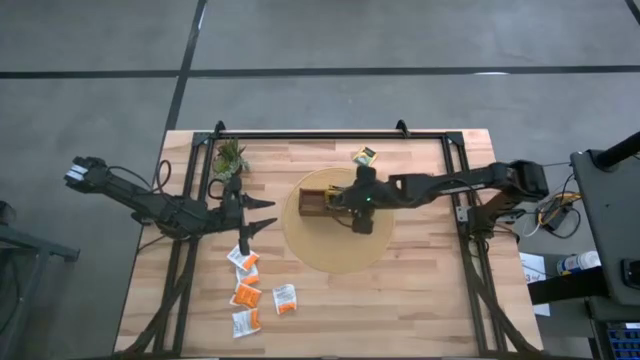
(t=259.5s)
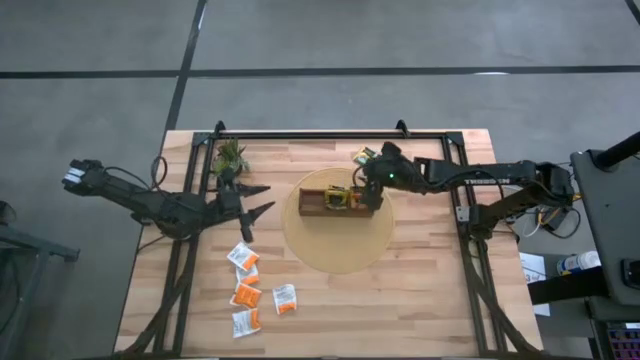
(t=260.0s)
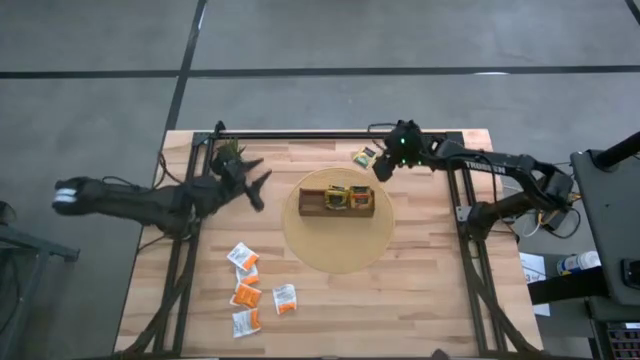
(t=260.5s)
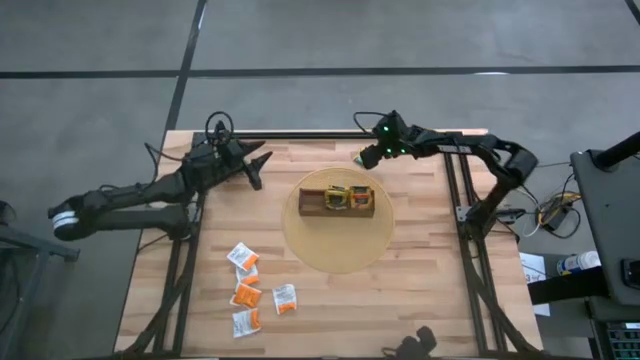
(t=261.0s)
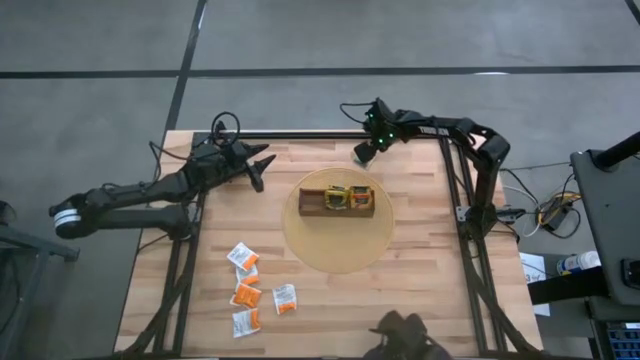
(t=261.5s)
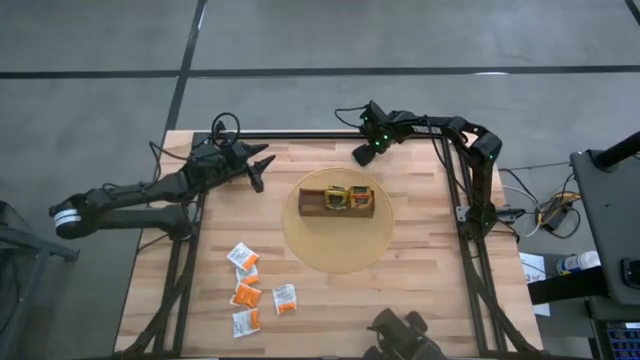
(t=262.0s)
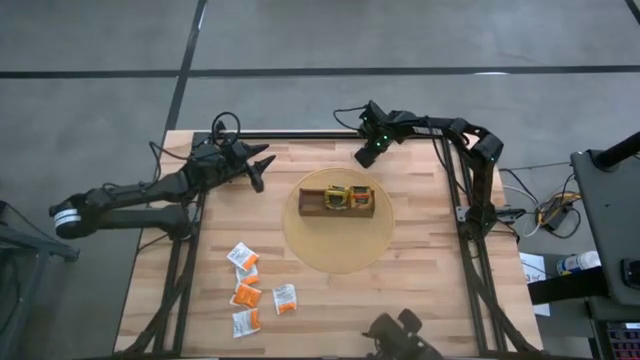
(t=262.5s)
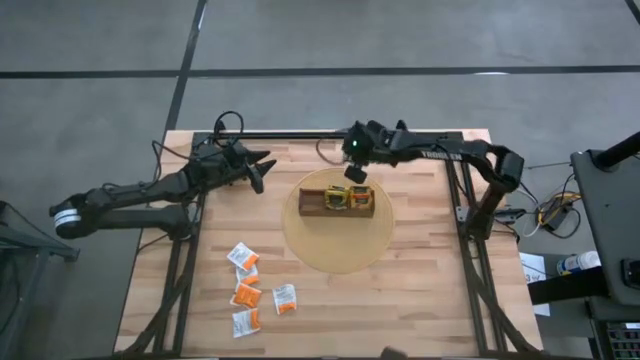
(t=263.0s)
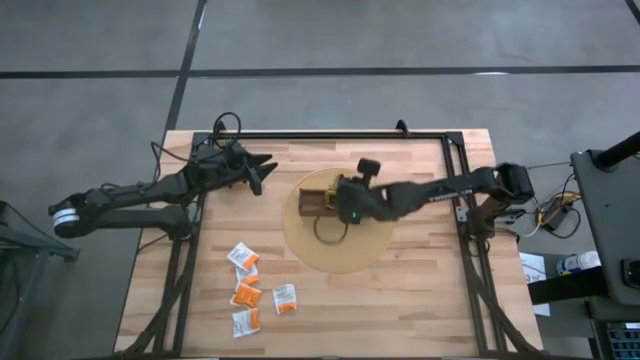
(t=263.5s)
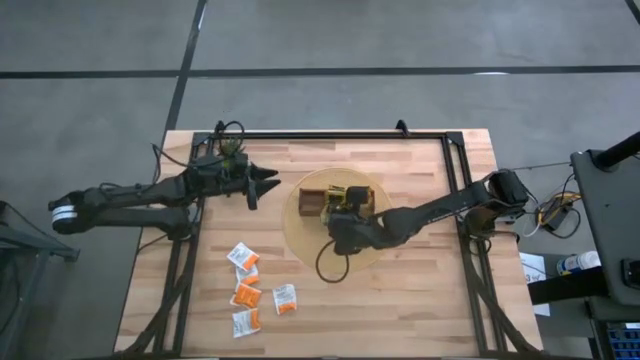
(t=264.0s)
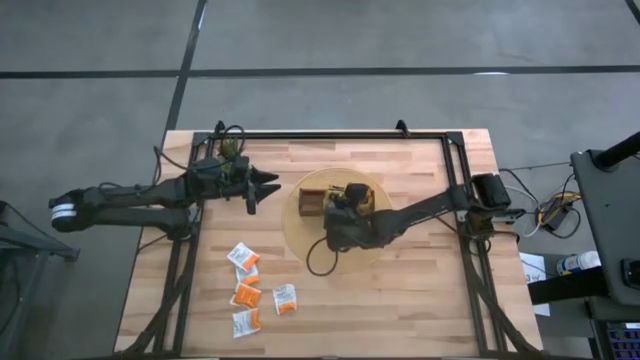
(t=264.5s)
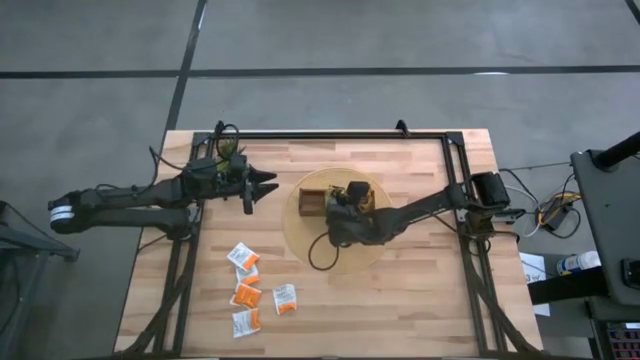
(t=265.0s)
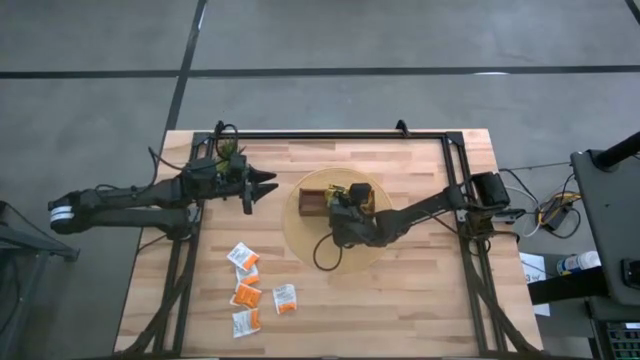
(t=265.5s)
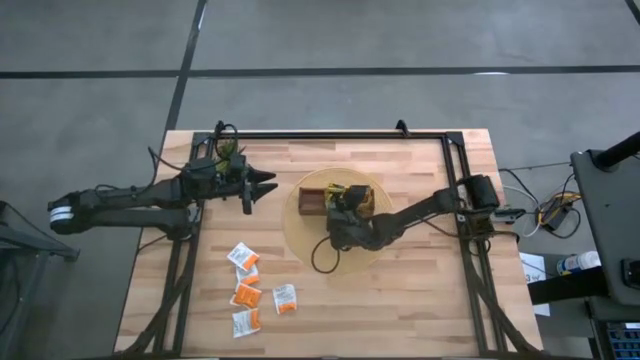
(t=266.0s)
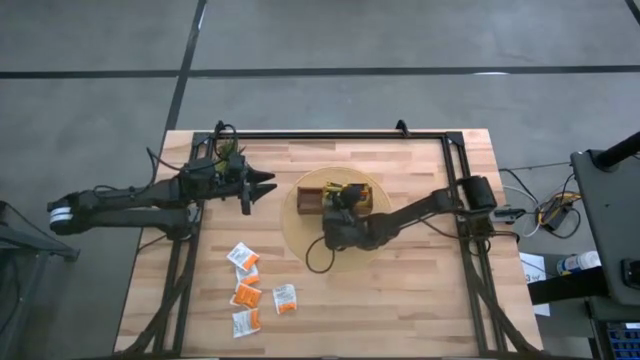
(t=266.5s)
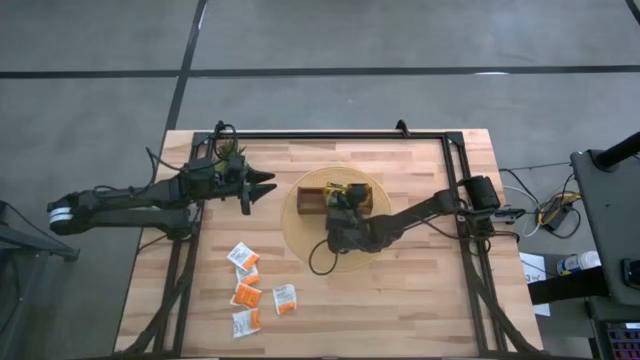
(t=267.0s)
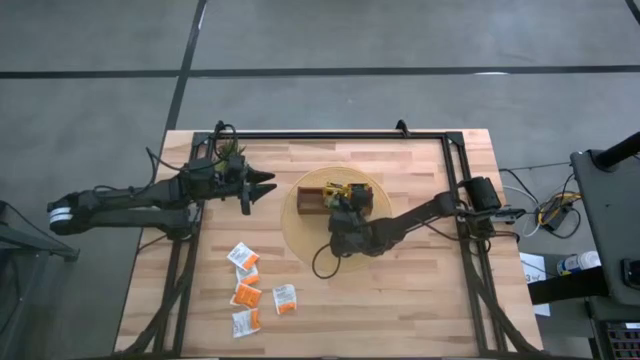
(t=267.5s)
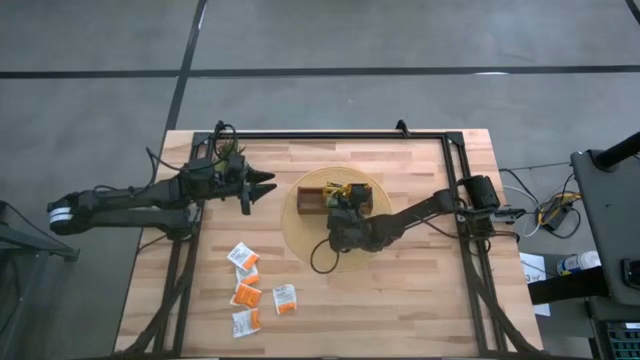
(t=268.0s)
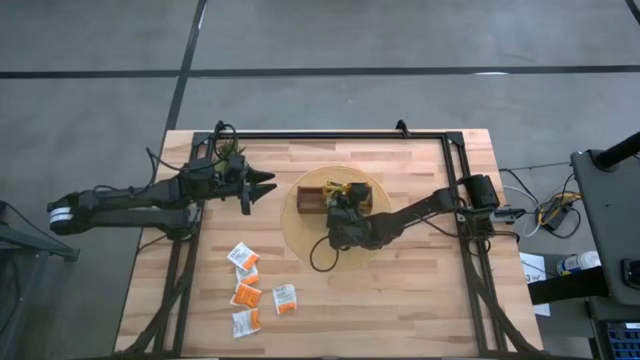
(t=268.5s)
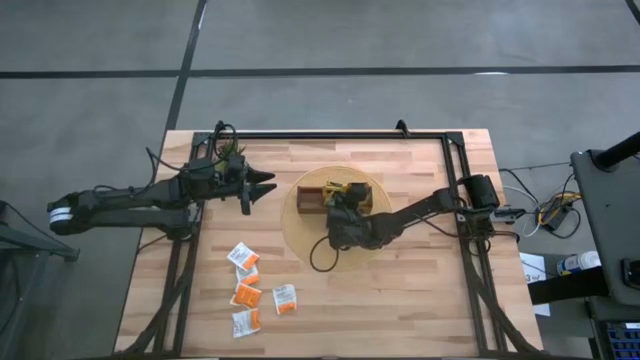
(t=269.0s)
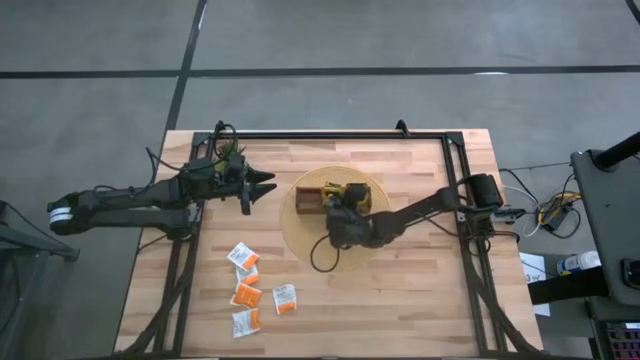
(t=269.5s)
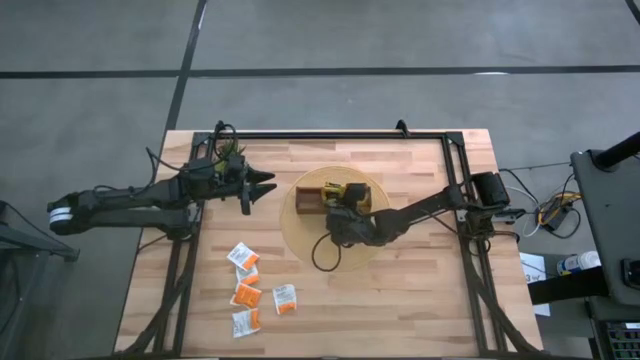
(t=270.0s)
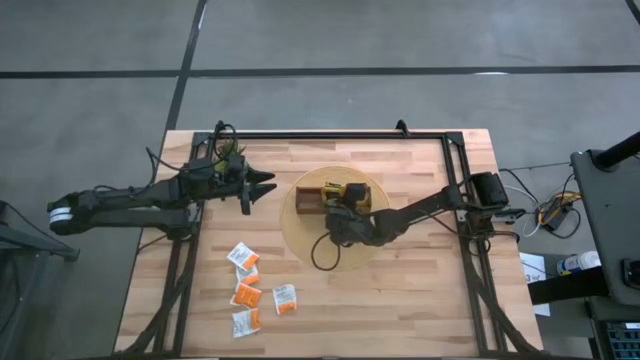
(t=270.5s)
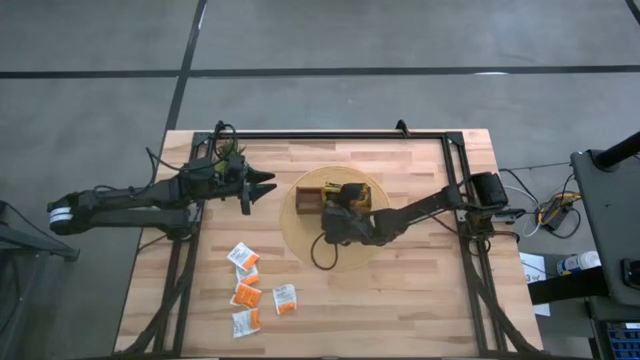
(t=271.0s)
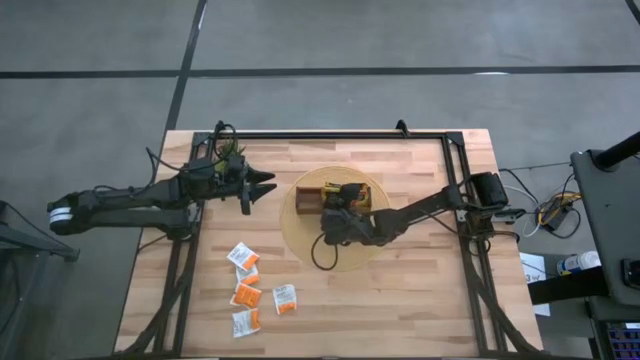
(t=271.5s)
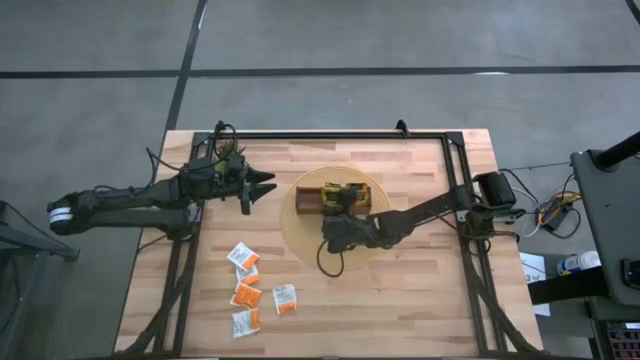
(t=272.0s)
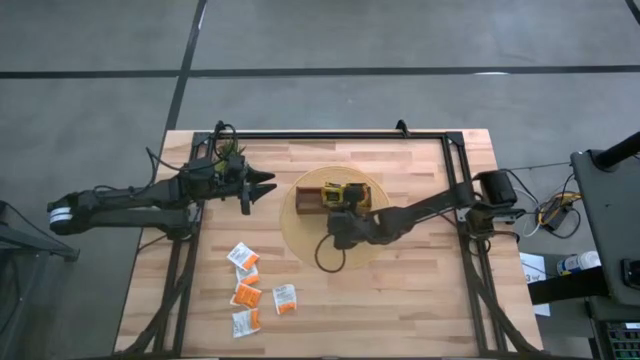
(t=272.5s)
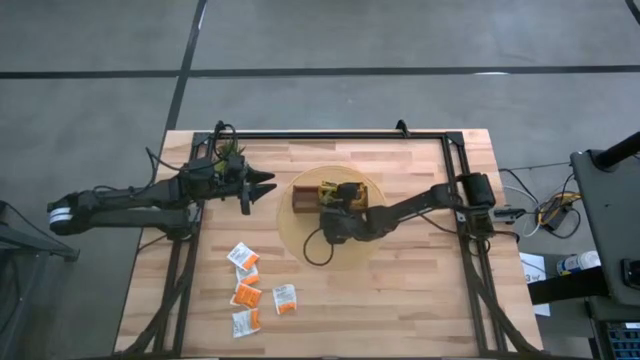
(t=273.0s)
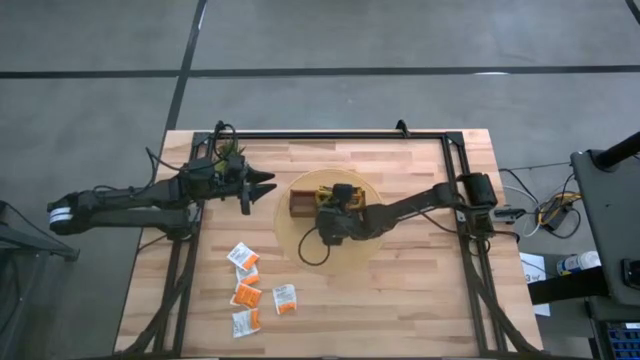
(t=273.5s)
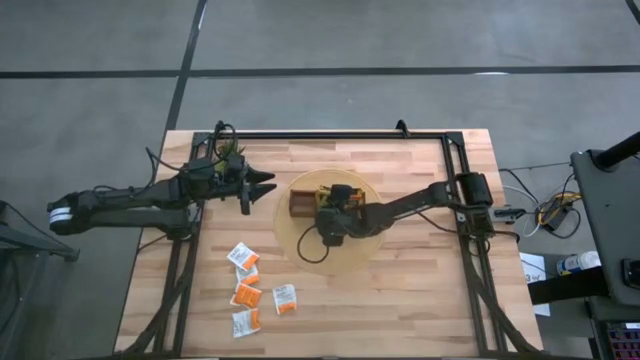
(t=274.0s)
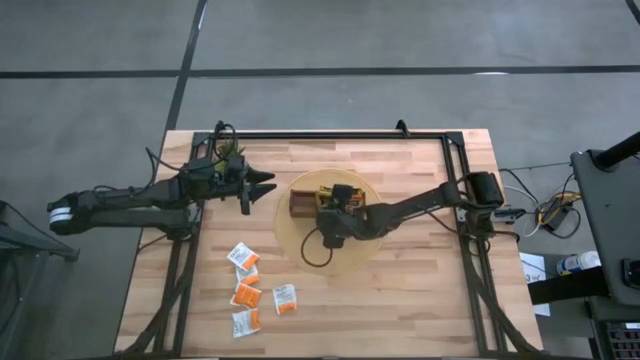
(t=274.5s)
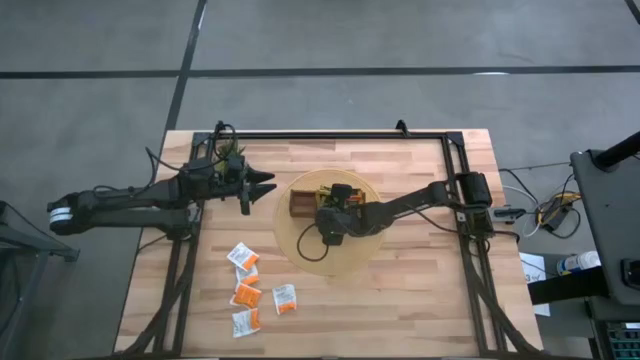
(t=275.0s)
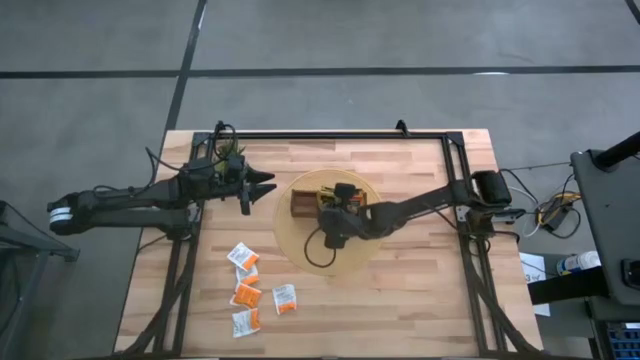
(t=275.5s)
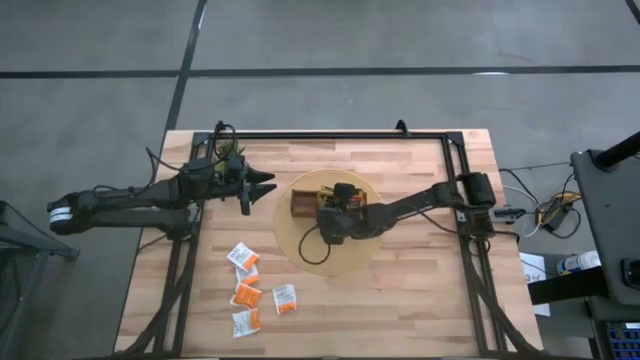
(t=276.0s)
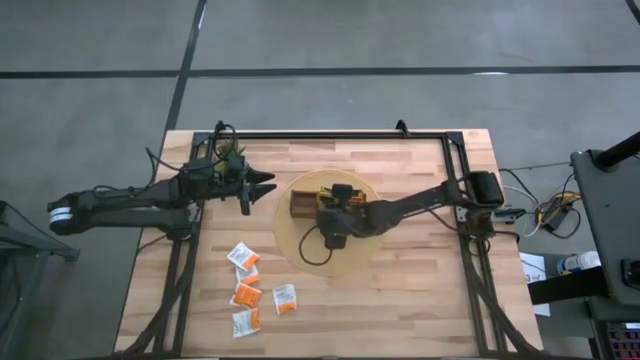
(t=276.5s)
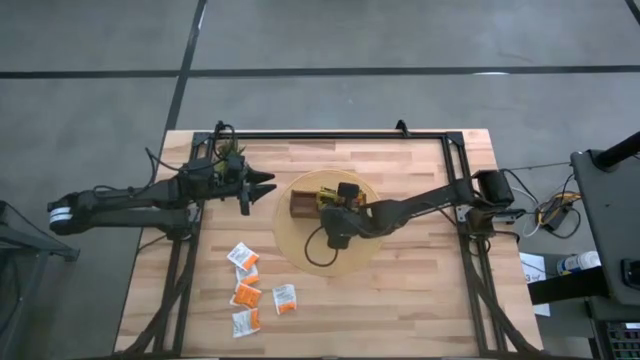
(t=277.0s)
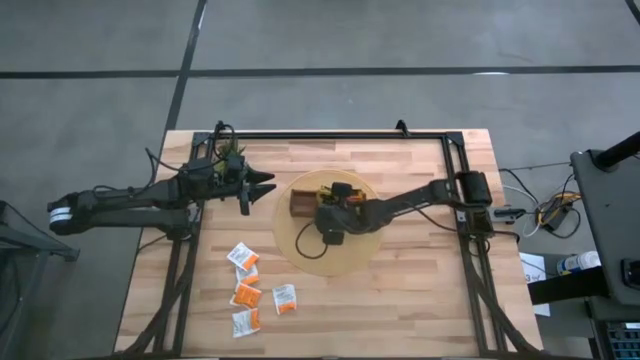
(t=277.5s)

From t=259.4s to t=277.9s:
Task: Pick & Place Tea
Put the yellow tea bag into the middle section of the wooden organizer

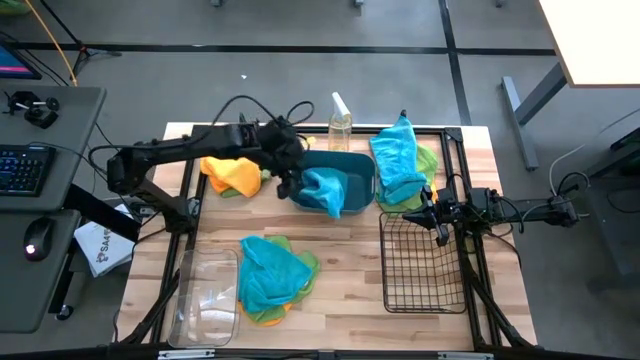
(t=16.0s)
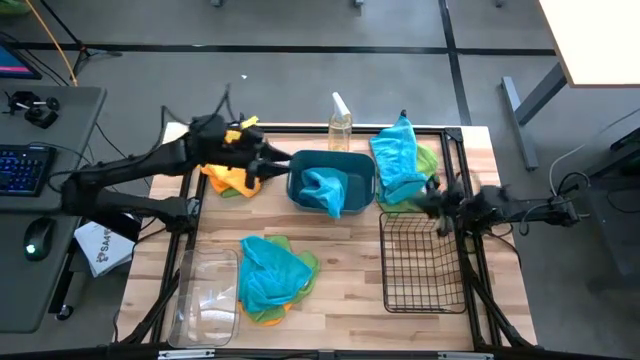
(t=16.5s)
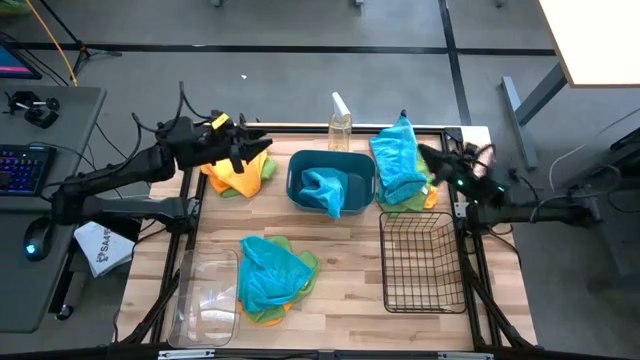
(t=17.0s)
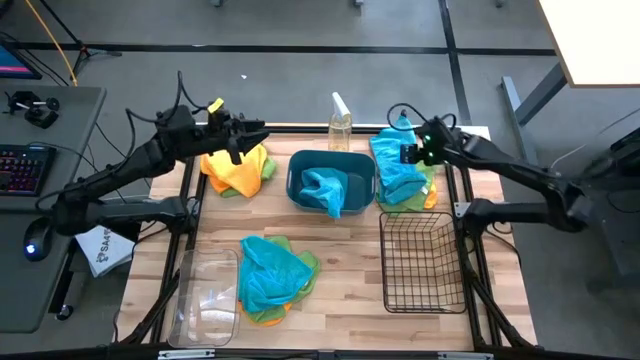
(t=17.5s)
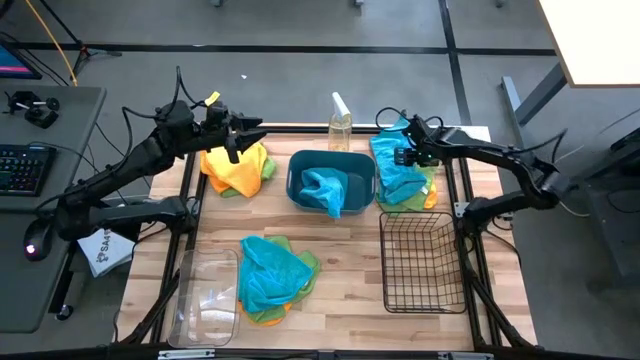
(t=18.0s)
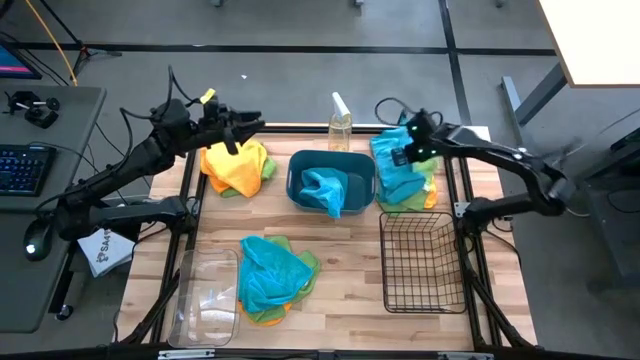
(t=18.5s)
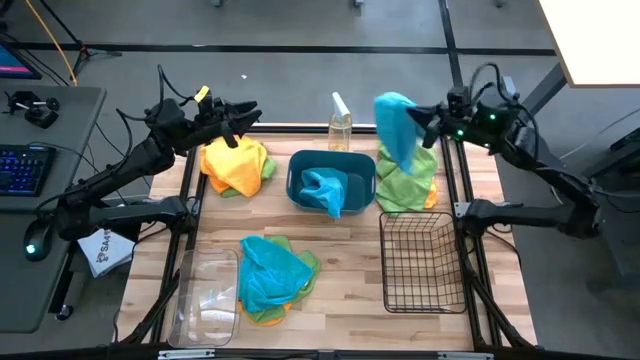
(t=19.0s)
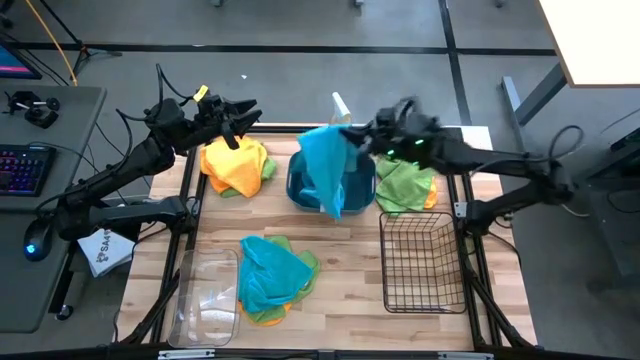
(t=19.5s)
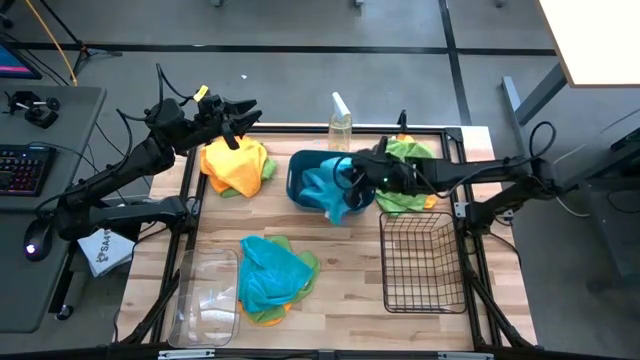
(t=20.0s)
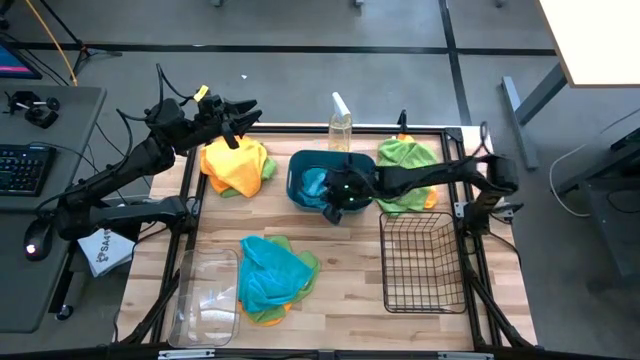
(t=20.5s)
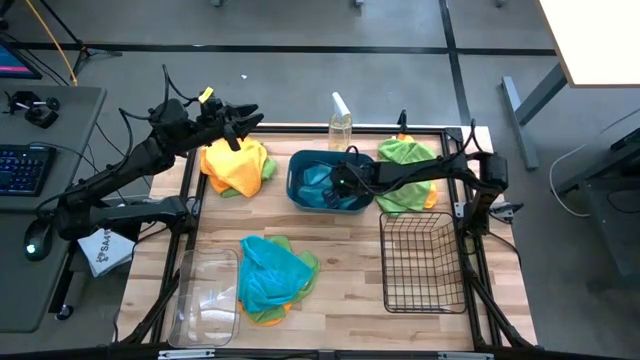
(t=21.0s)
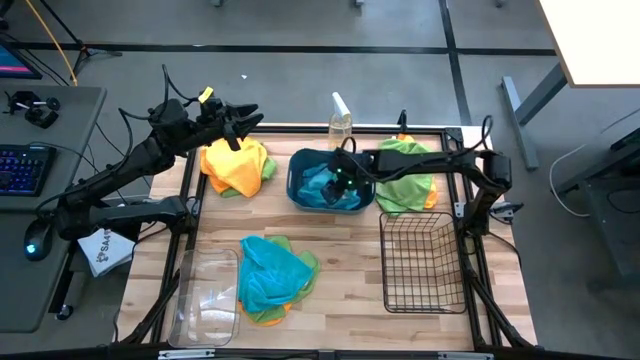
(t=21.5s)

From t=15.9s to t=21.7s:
Task: Sort microfiber towel by color & place in baskets
Put the top blue towel into the blue bin
